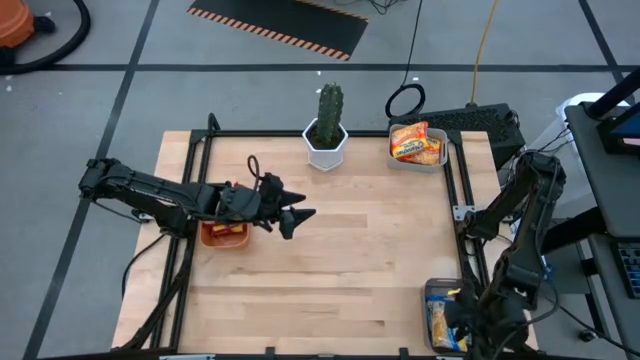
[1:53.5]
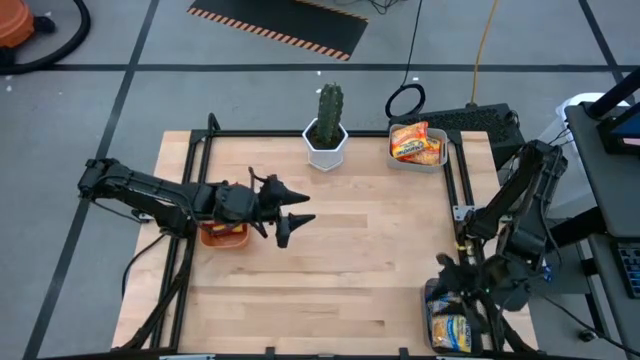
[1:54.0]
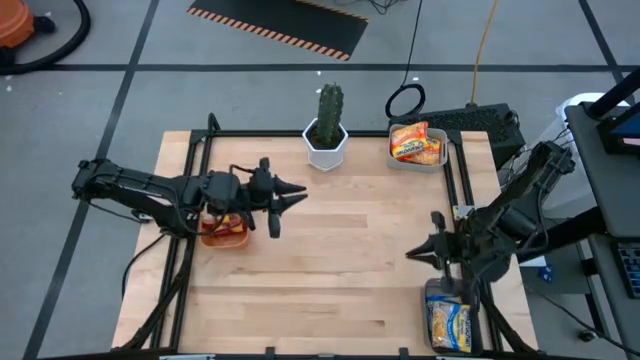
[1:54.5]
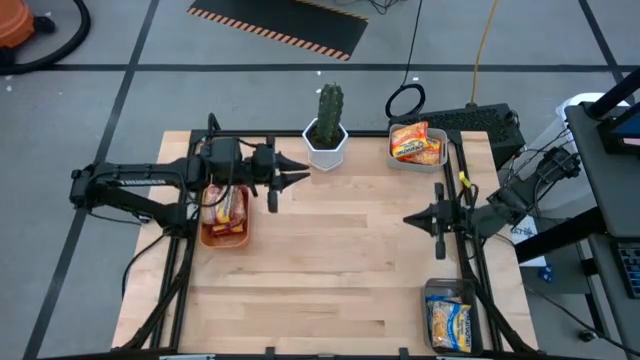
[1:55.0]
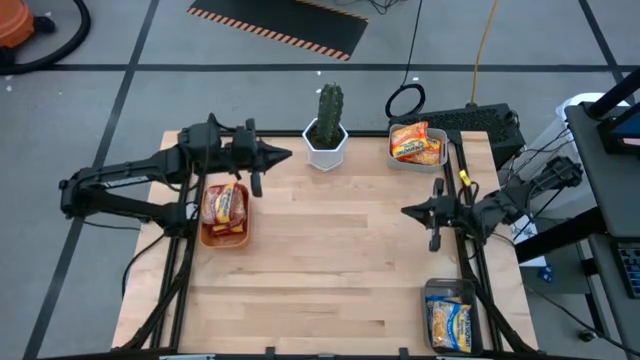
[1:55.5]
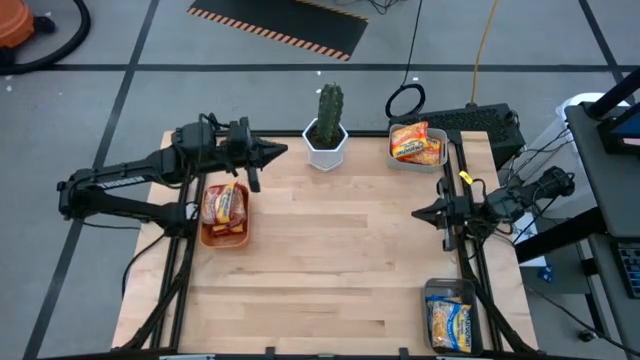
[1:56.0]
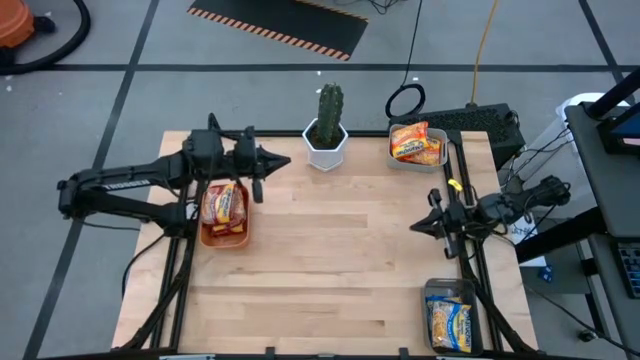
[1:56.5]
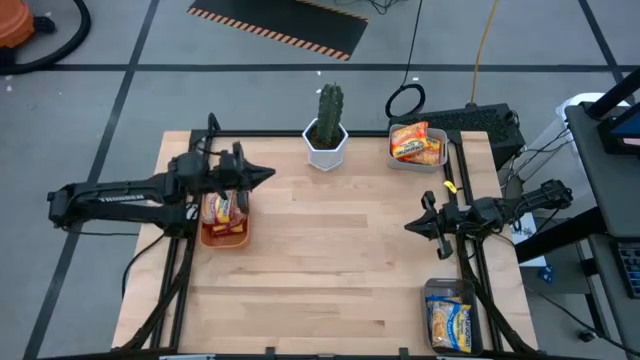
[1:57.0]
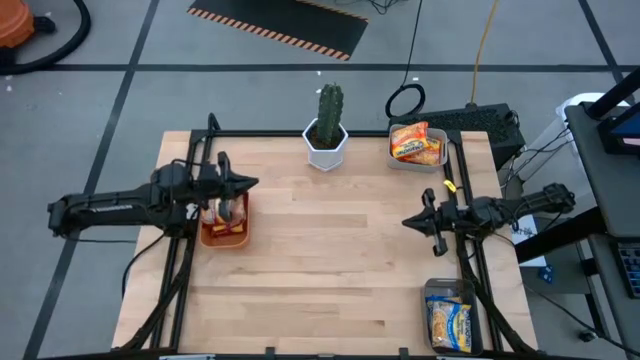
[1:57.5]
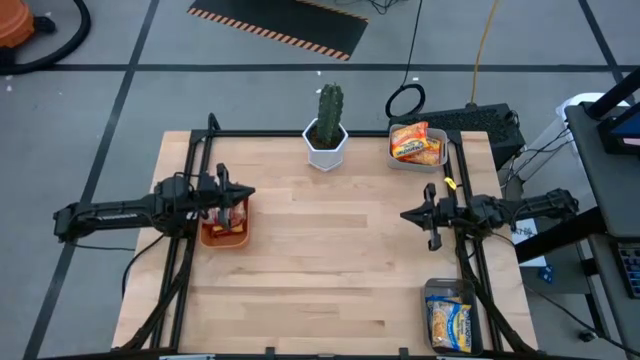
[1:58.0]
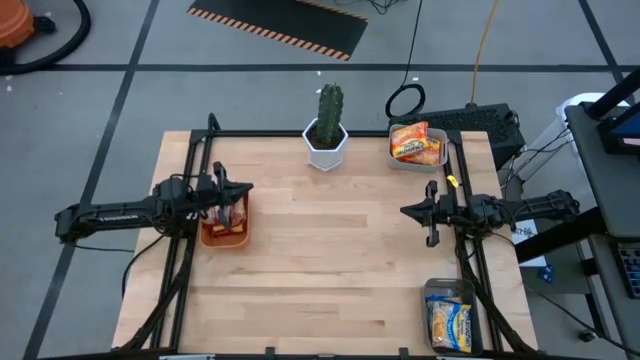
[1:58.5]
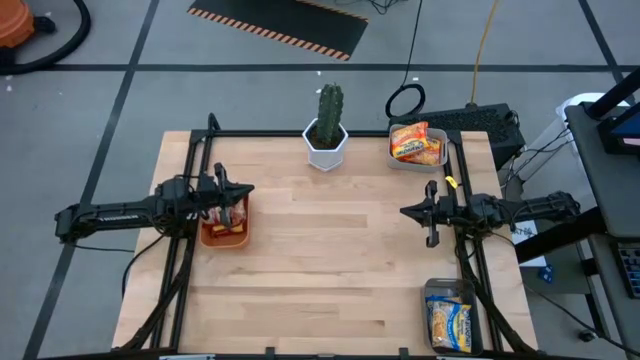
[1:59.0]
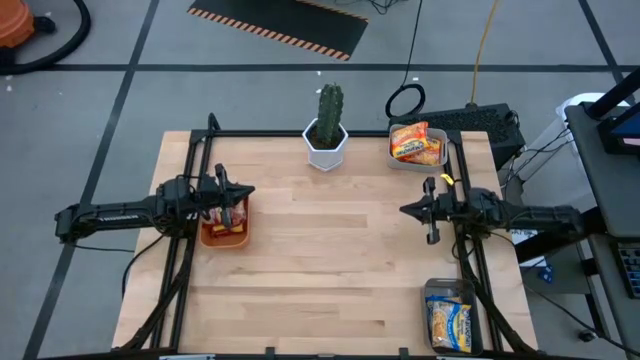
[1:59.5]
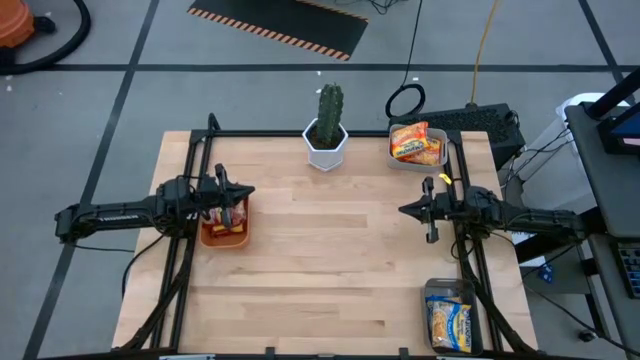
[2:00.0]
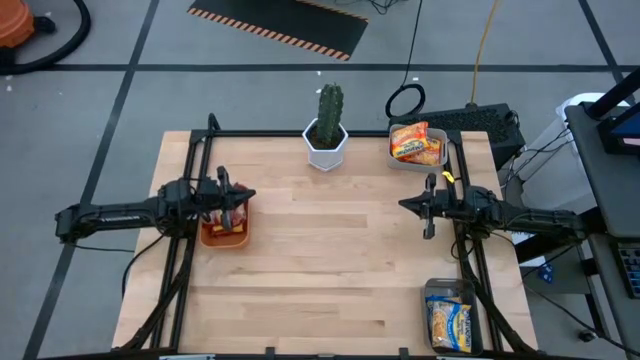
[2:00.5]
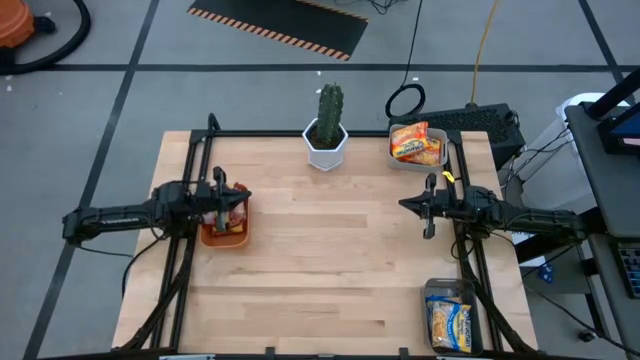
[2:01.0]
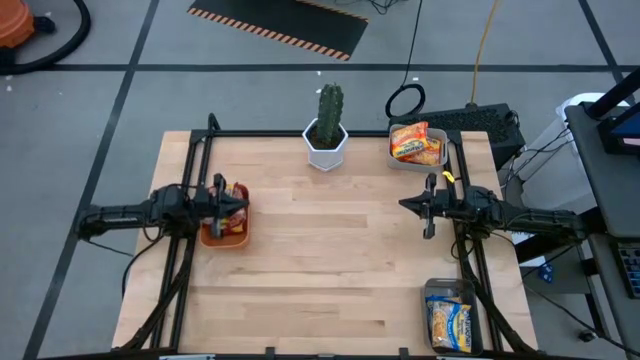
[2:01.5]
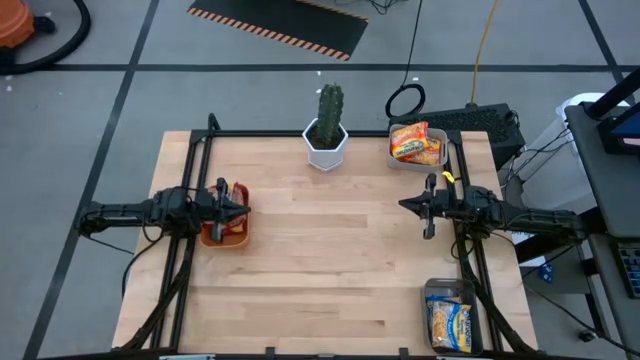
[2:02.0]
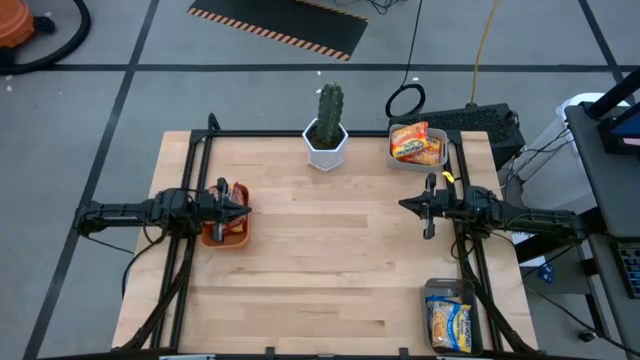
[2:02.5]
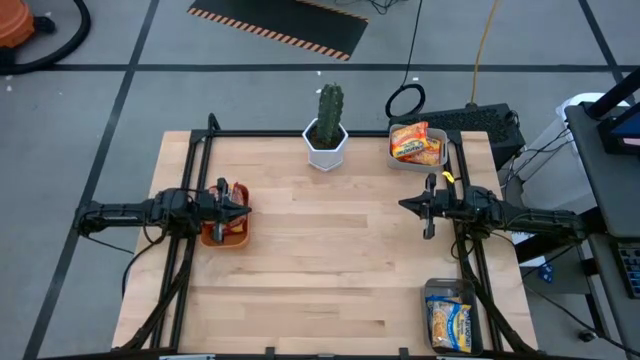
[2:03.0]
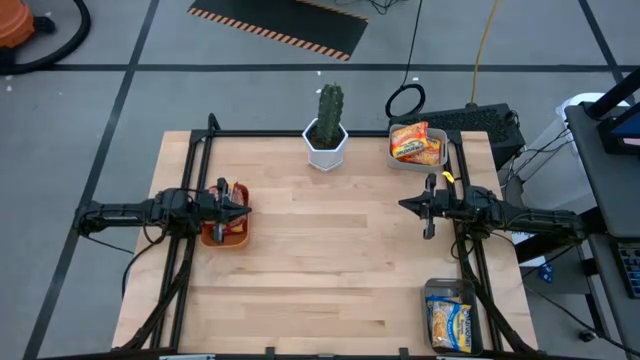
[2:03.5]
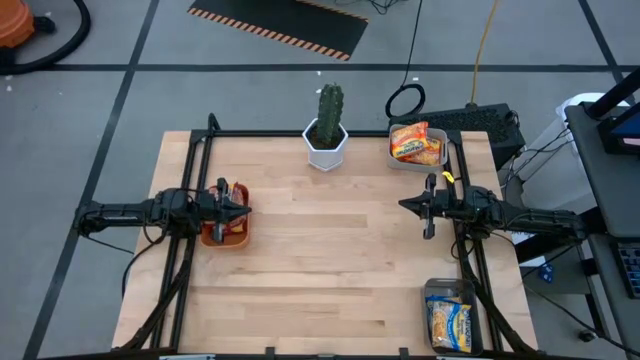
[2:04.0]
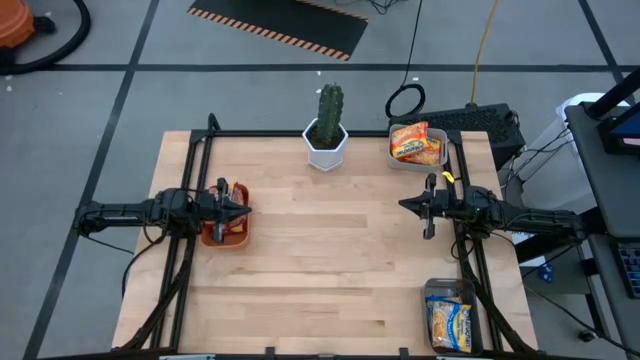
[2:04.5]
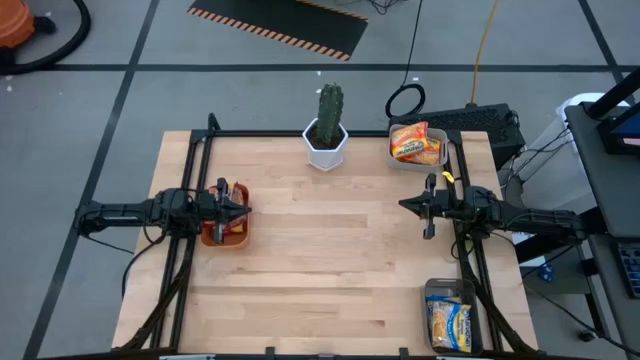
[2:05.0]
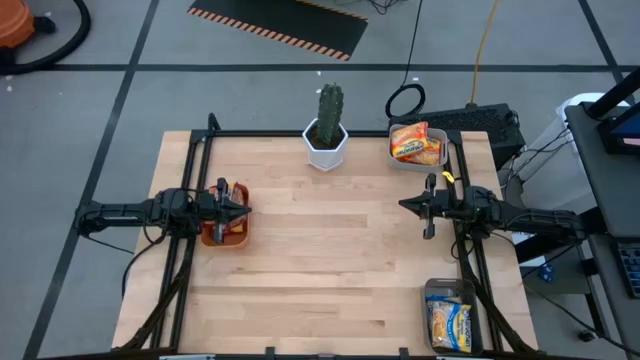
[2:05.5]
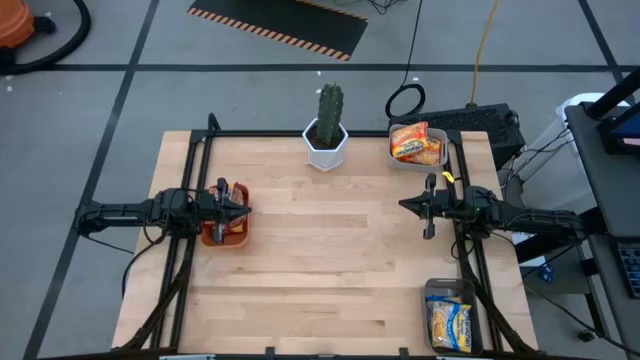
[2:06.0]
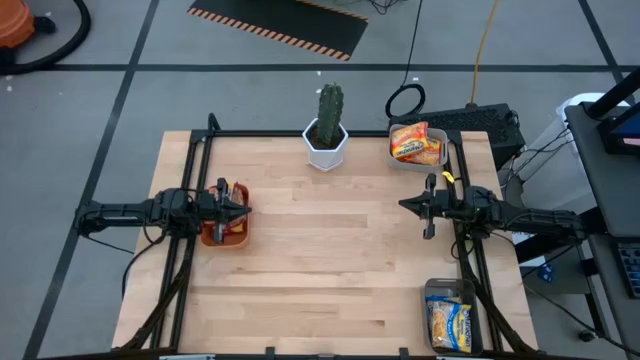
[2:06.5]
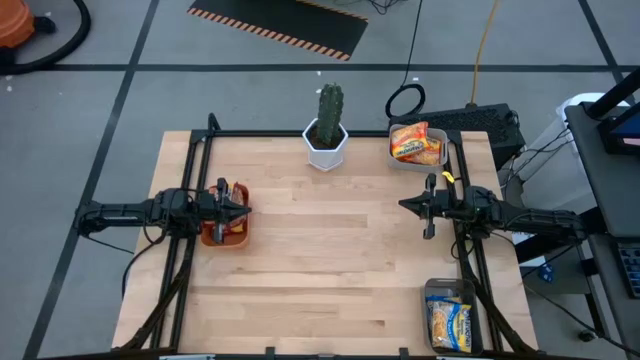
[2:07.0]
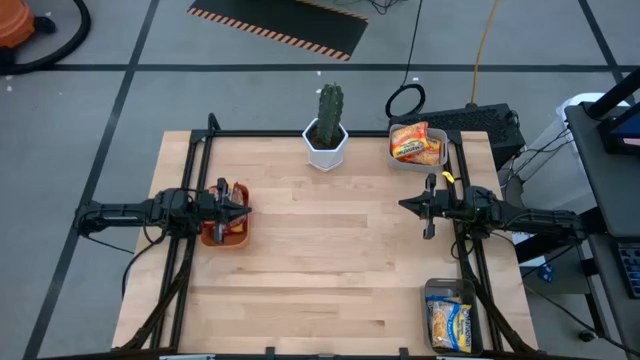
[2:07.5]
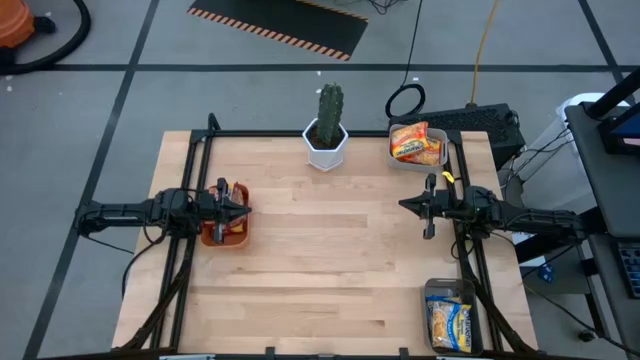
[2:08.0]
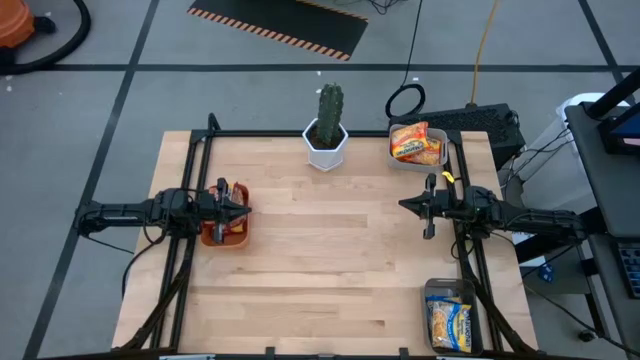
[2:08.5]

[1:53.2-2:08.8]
Task: Sort Maruchan noodles
Return to Home Position

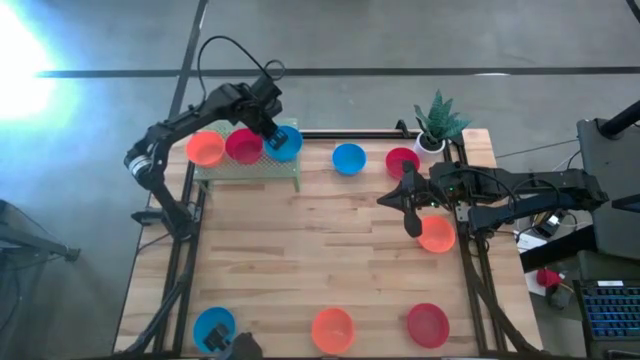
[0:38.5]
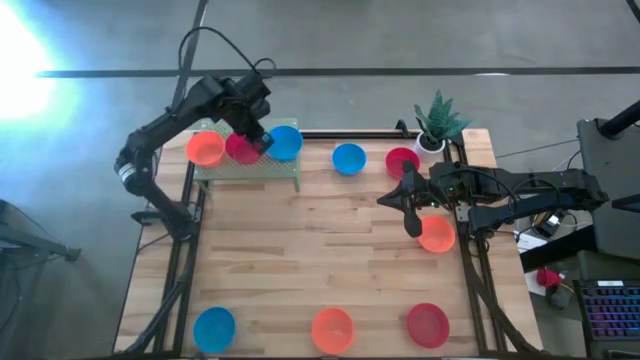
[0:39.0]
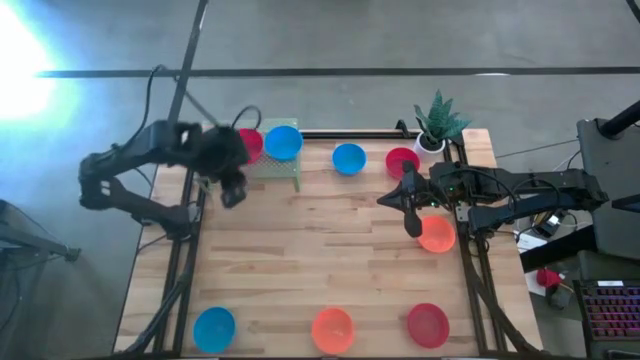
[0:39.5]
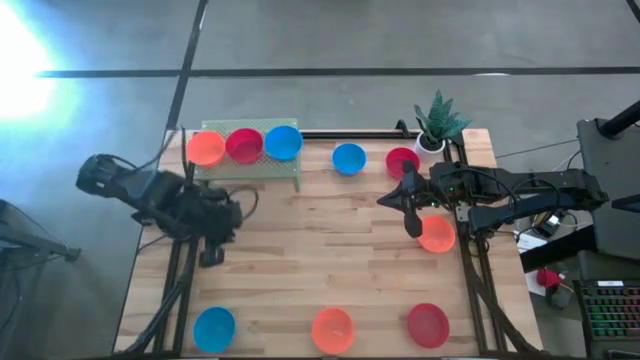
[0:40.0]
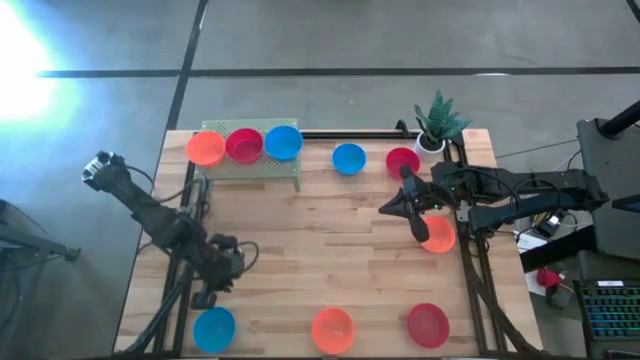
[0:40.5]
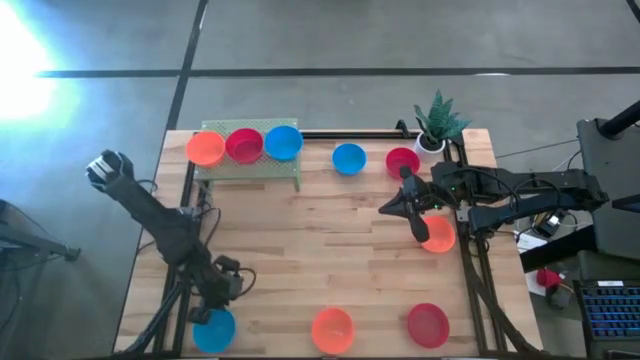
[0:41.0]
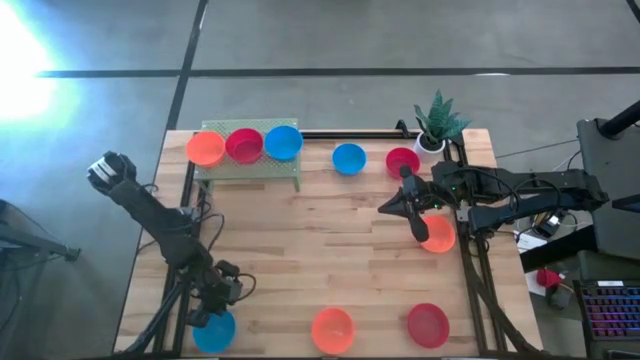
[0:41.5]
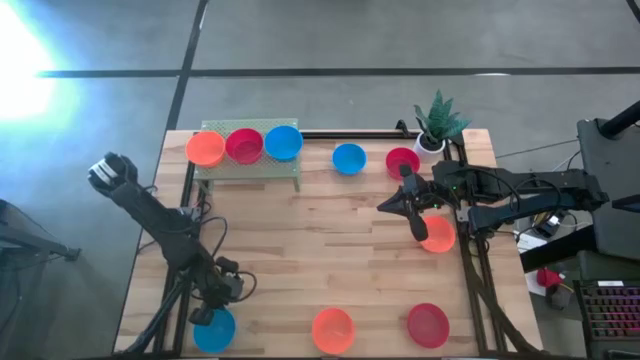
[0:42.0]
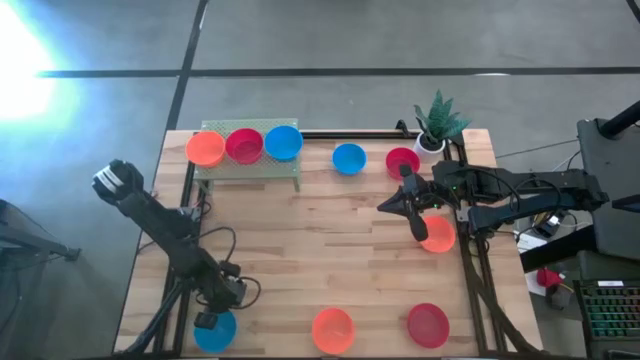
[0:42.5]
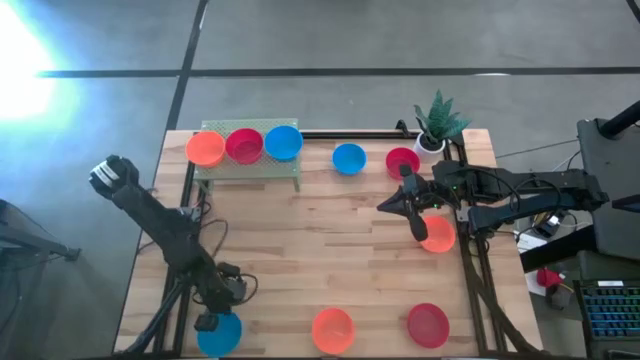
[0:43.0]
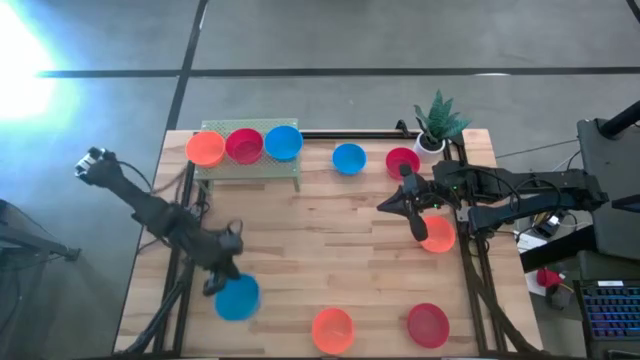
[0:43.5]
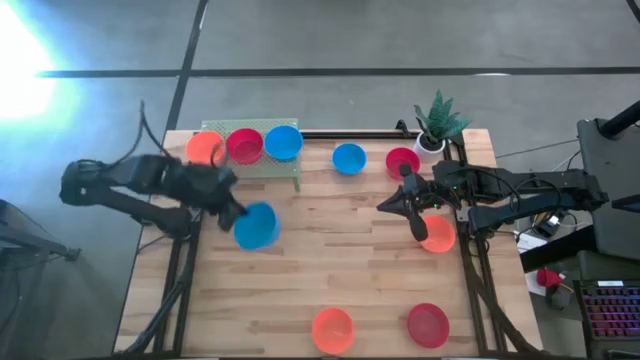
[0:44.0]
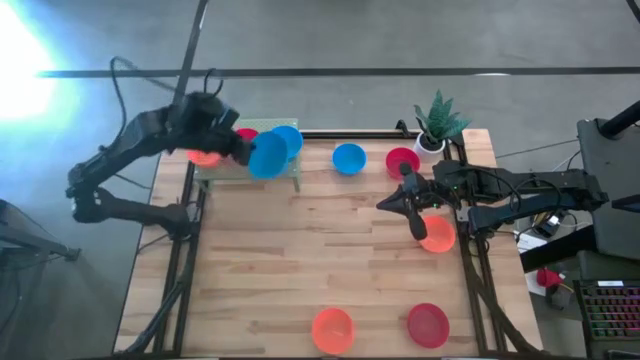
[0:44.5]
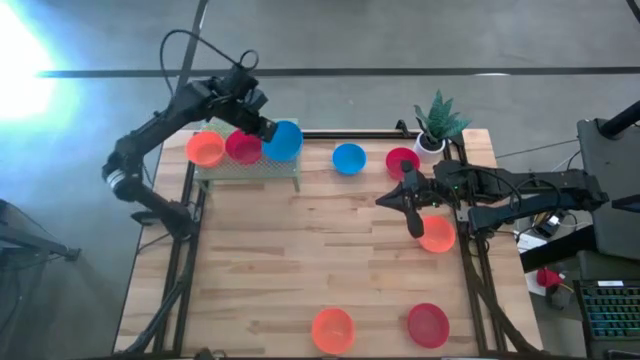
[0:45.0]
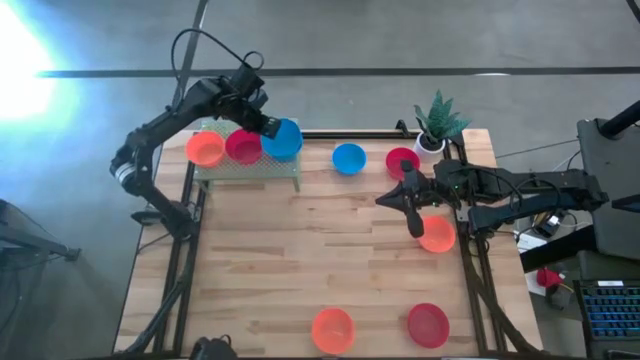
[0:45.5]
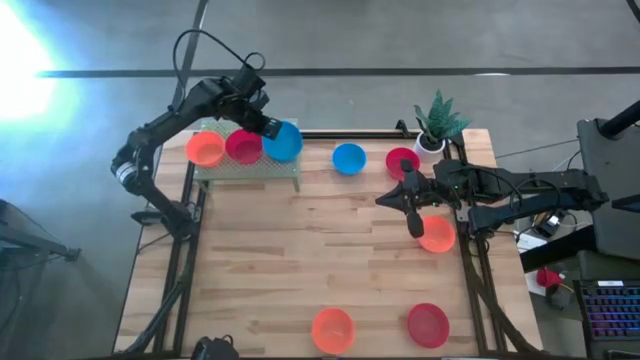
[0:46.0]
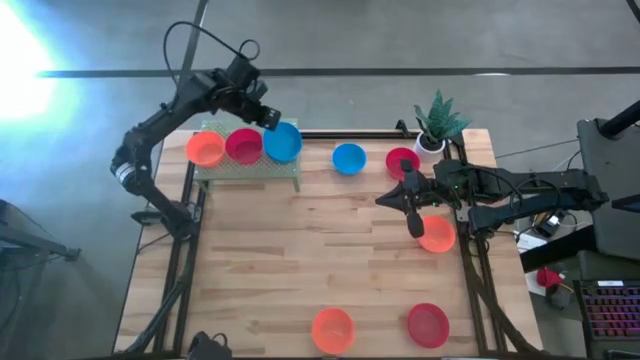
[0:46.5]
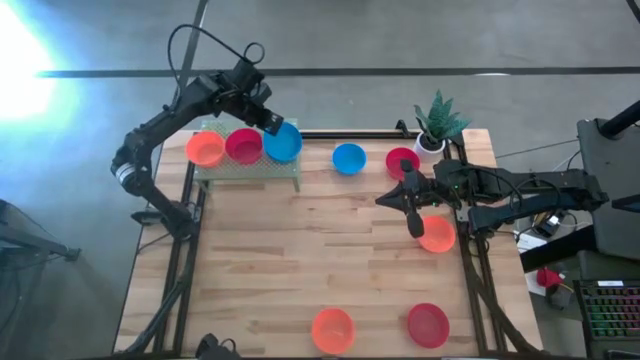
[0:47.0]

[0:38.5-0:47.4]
Task: Pick & Place Mini bowls
Stack the bottom blue bowl on top of the other blue bowl on the shelf
